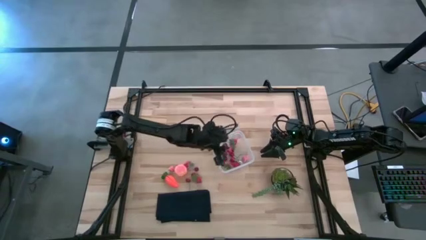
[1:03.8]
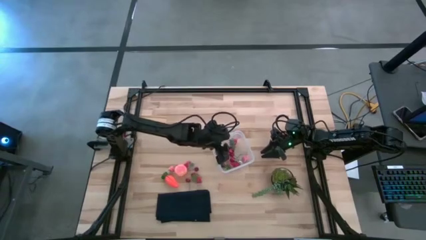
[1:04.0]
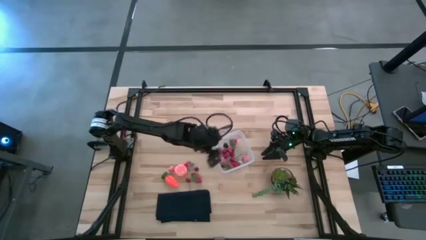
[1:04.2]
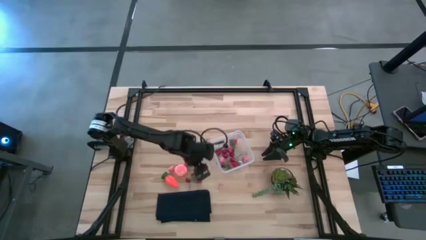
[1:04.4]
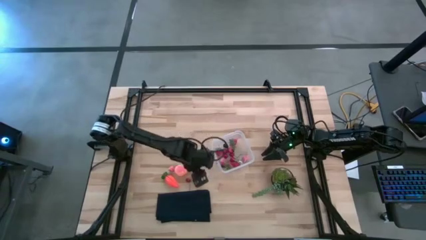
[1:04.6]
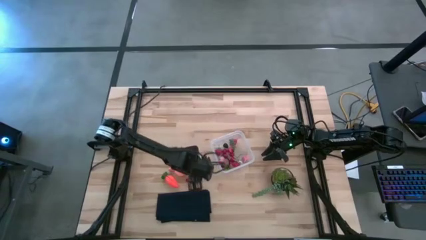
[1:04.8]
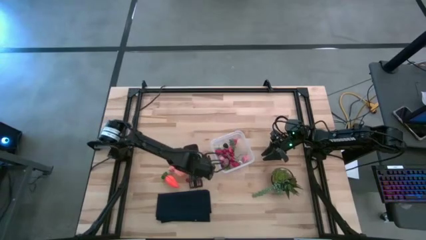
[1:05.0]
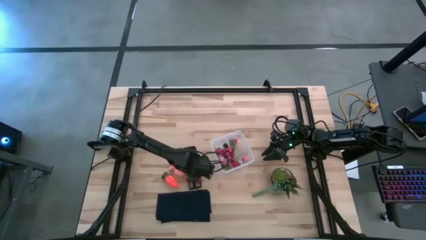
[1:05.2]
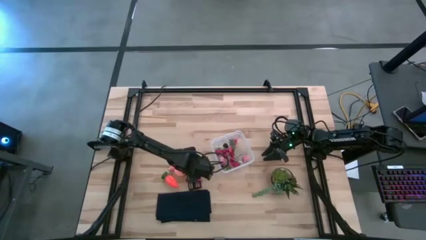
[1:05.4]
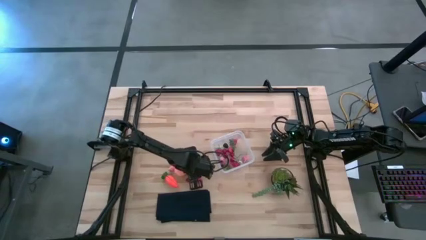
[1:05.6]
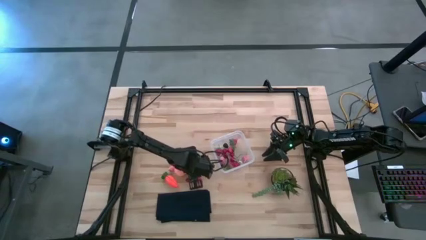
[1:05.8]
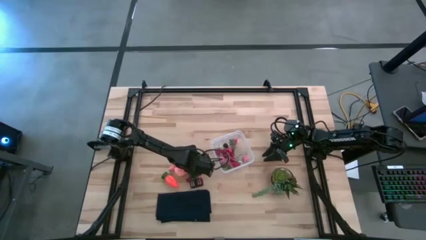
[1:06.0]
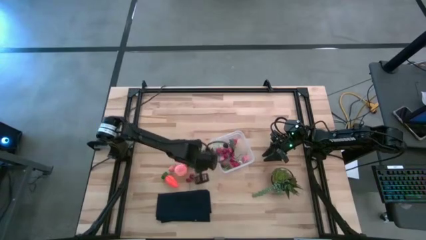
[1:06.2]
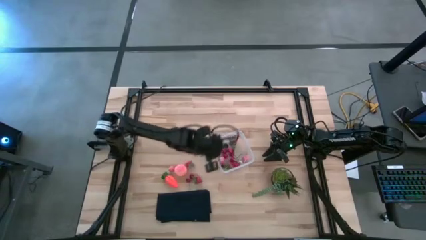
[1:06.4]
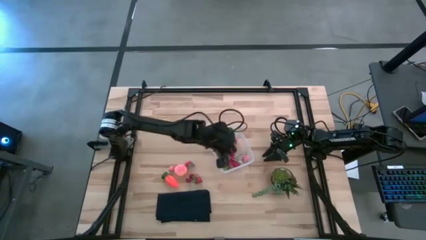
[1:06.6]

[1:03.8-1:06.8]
Task: Pick and placing Produce into tupperware
Put the red cherry into the container

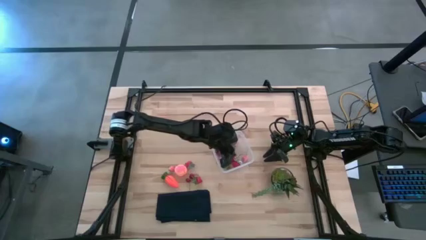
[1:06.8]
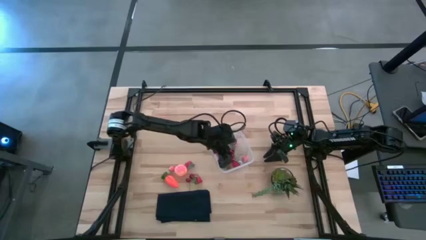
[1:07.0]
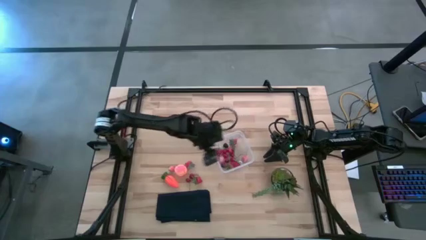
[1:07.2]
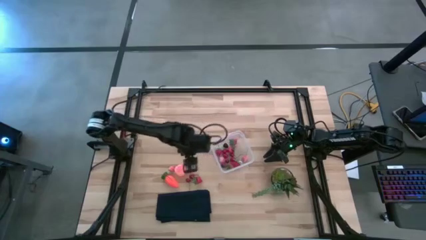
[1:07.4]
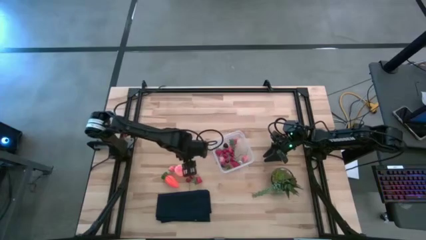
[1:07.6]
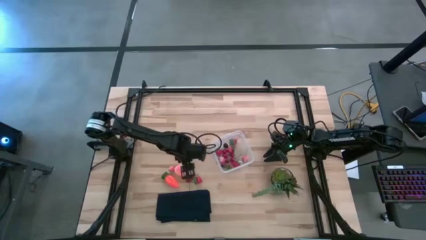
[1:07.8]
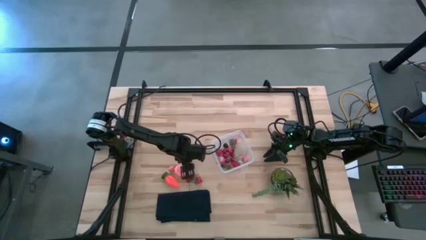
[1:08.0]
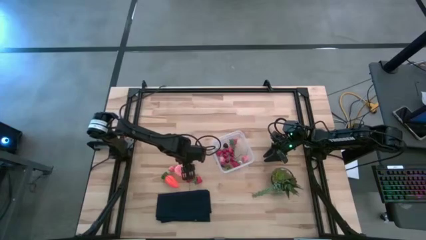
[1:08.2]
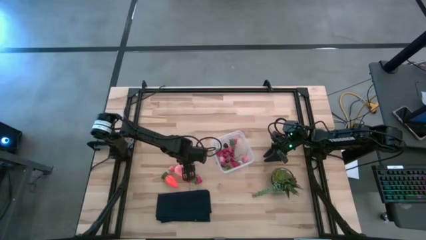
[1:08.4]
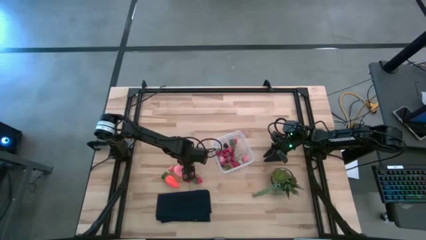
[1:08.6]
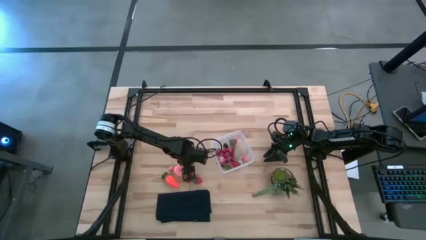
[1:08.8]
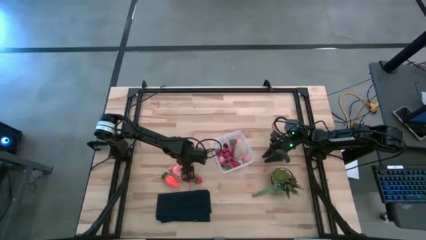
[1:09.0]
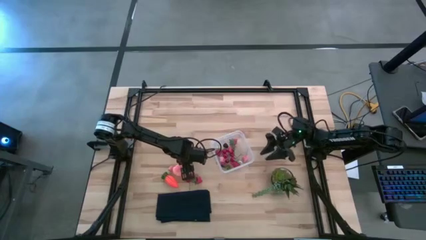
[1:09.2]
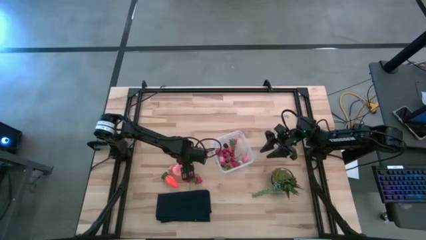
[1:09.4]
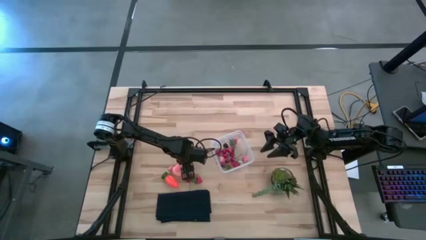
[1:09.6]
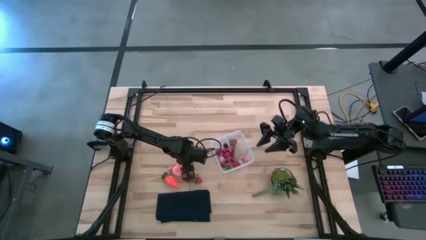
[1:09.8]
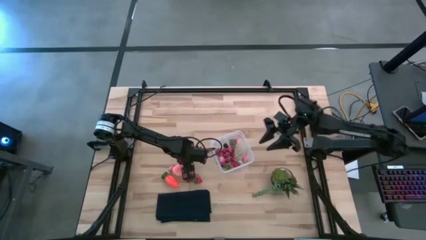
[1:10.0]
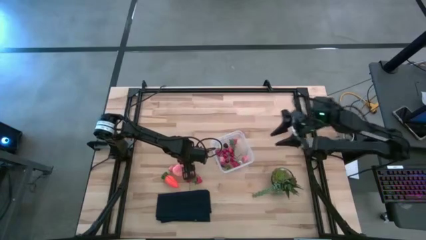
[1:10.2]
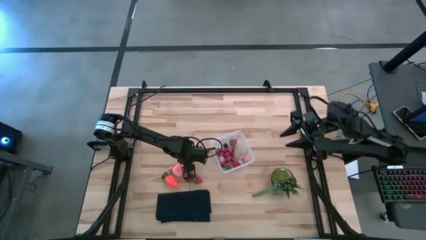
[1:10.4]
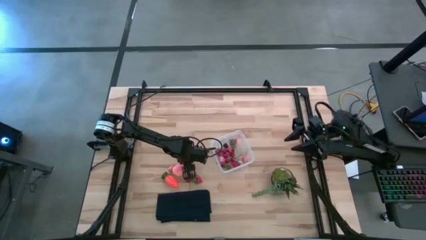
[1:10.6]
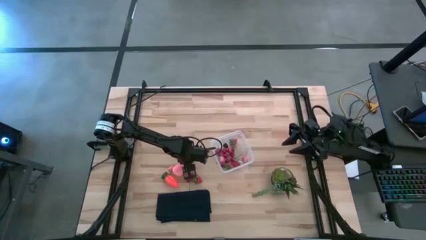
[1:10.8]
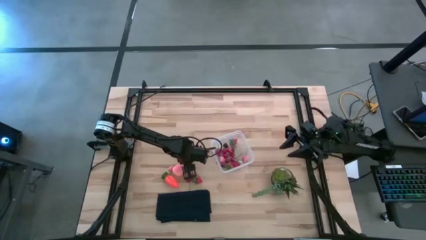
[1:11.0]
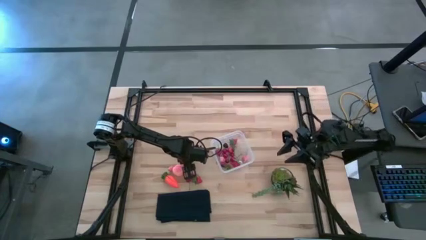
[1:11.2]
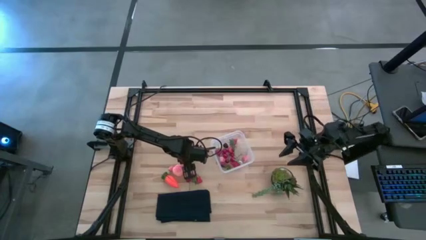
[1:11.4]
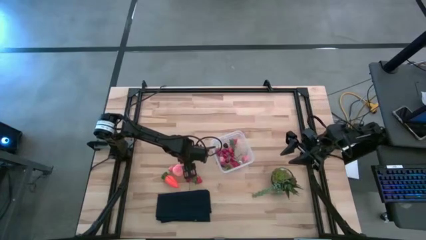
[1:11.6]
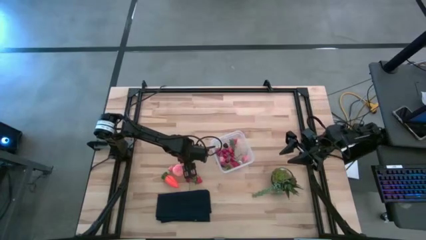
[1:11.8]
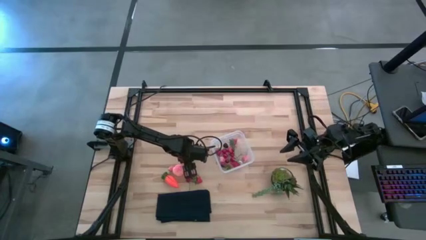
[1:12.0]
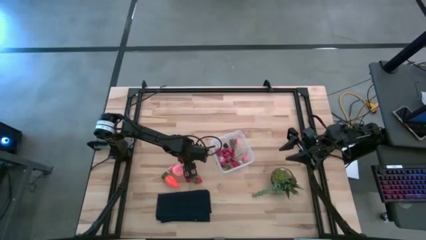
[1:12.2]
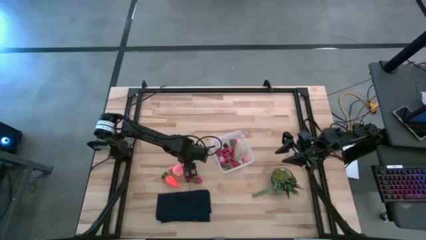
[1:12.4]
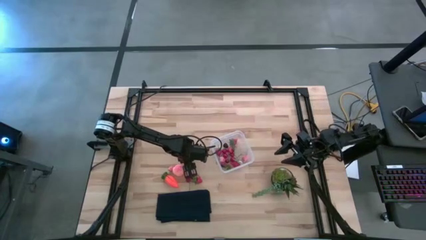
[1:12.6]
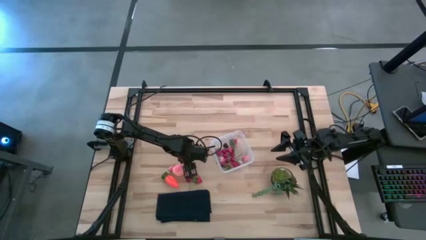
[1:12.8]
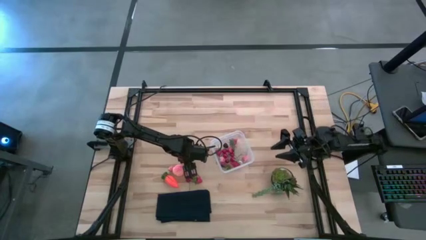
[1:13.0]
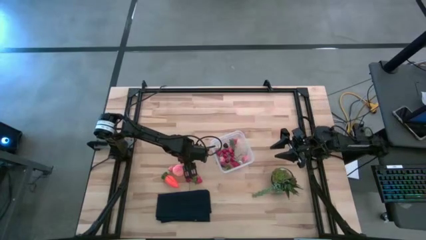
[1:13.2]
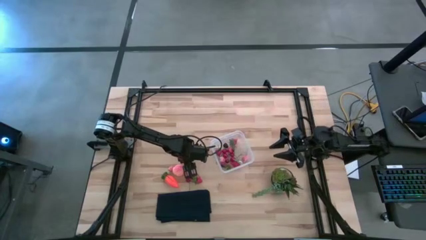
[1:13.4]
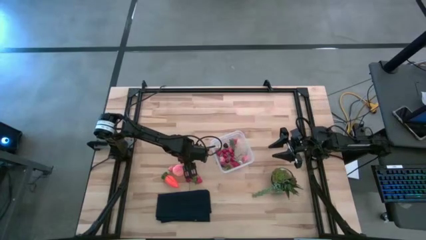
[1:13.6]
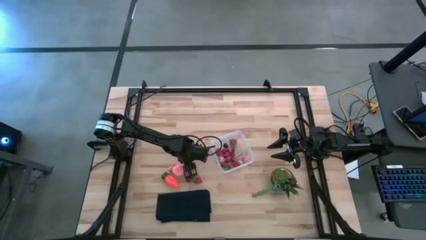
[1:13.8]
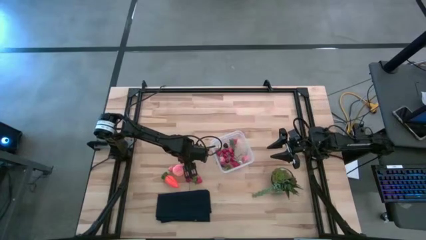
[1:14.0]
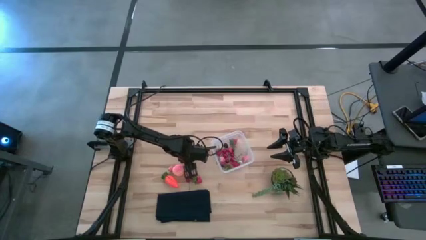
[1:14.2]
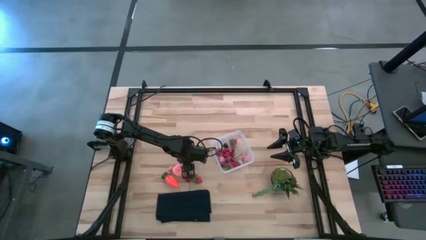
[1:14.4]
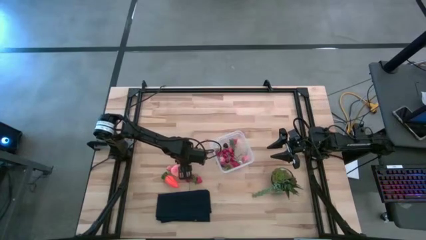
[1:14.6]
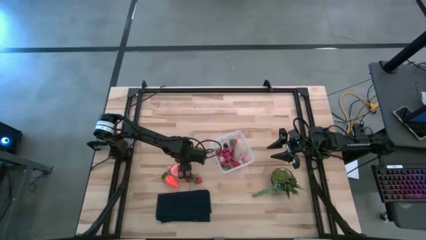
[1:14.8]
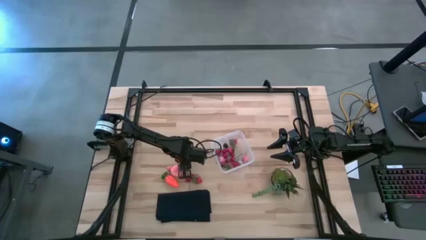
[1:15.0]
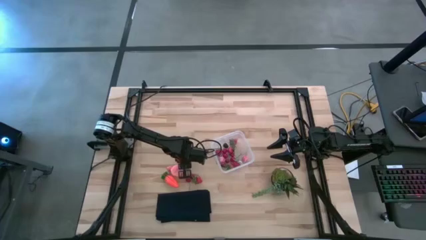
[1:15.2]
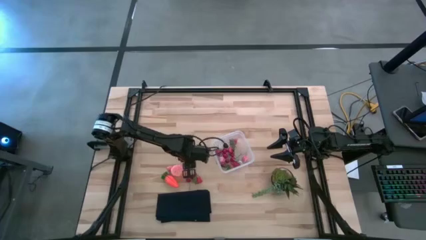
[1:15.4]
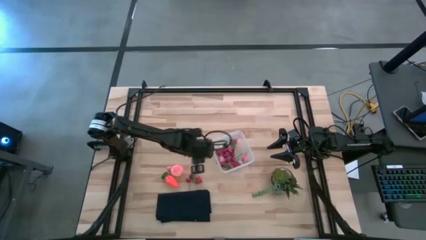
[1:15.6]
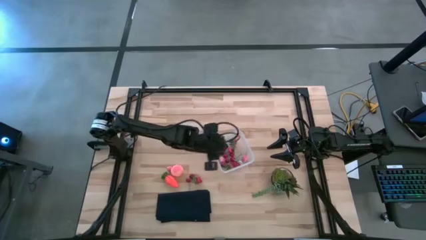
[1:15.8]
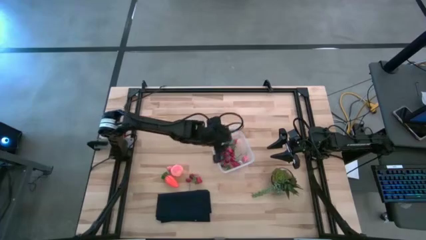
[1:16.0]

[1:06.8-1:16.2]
Put the red strawberry into the container

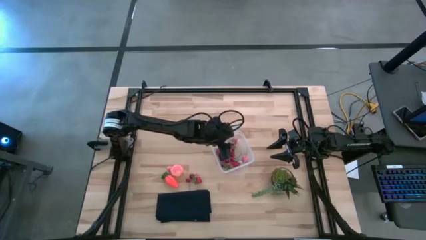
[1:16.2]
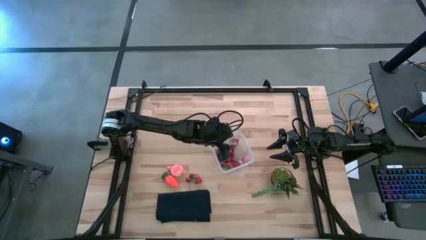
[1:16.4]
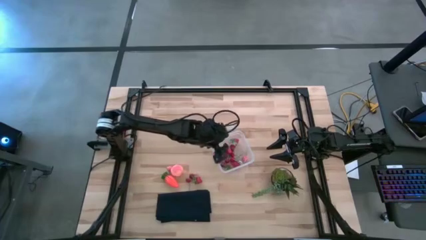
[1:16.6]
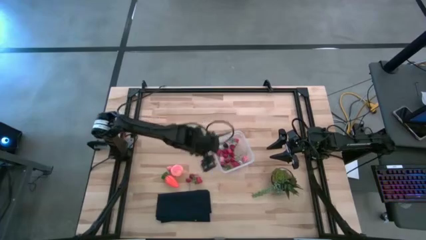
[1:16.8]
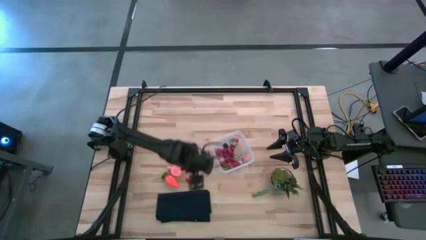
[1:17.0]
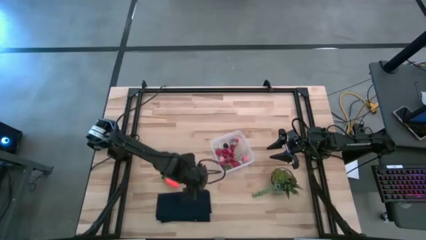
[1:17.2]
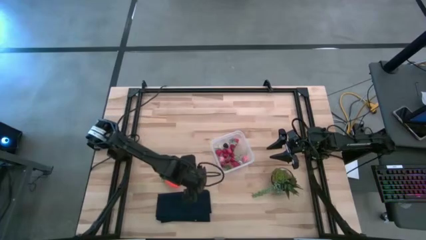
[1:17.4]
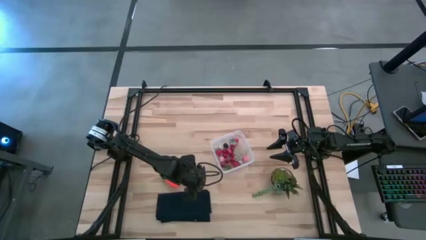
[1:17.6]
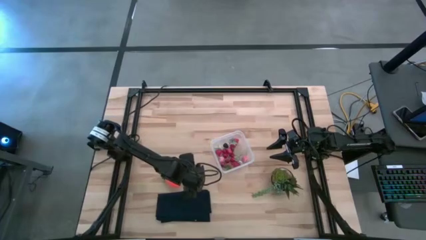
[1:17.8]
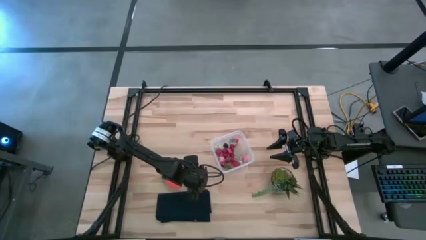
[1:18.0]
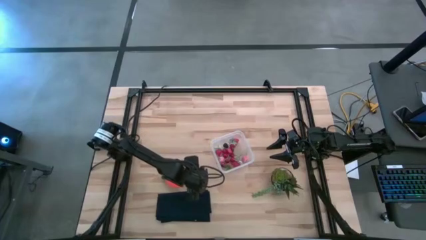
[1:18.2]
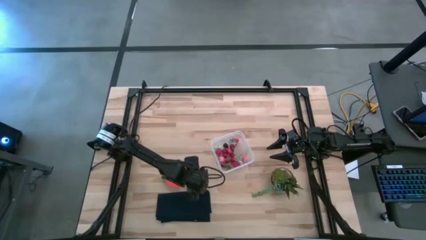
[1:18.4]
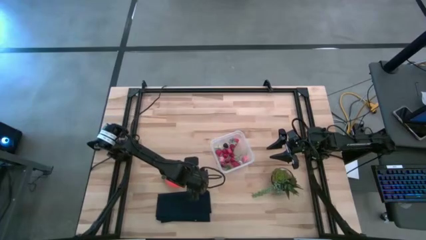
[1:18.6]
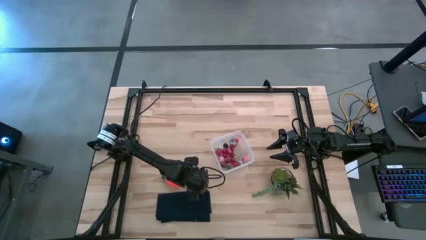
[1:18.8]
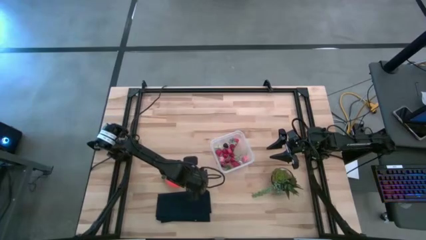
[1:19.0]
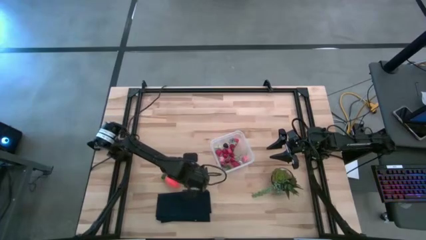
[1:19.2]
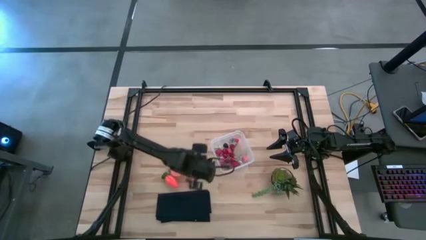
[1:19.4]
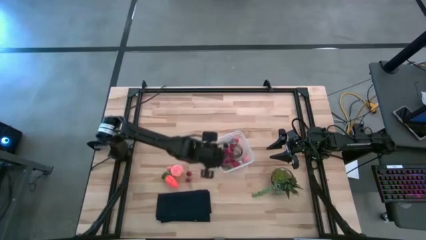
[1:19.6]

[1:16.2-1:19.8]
Put the red strawberry into the container

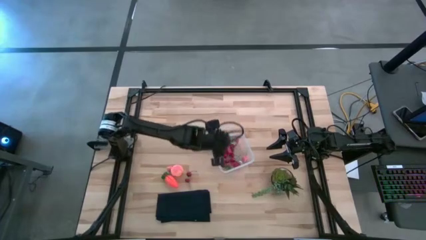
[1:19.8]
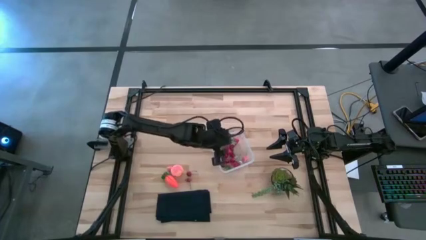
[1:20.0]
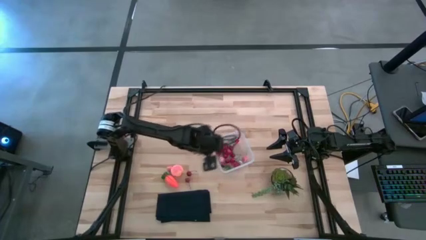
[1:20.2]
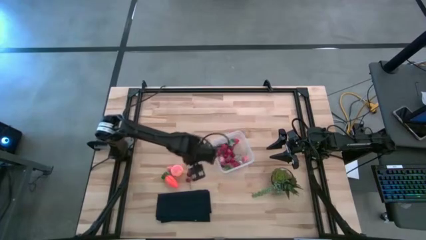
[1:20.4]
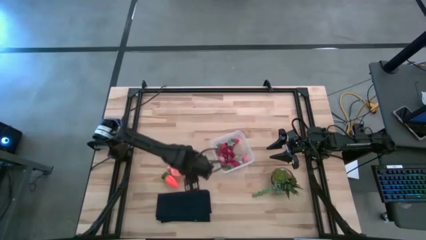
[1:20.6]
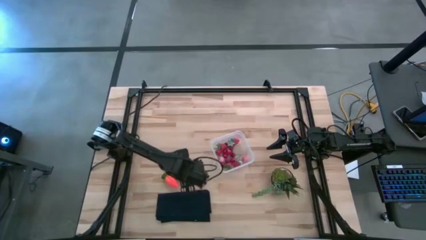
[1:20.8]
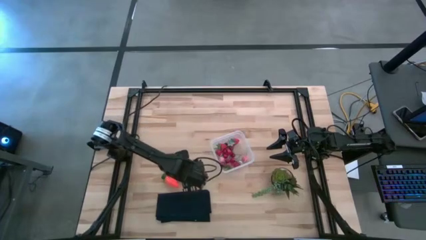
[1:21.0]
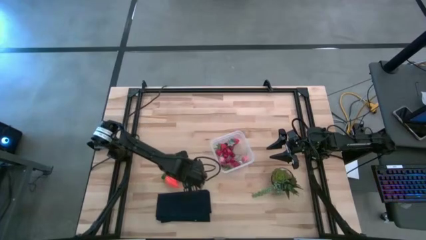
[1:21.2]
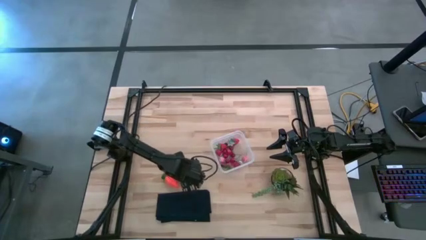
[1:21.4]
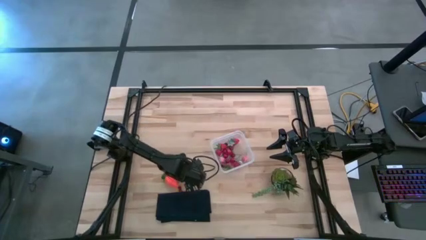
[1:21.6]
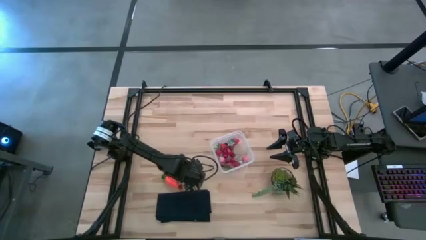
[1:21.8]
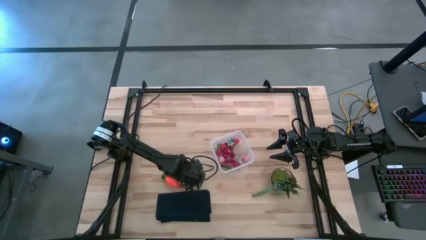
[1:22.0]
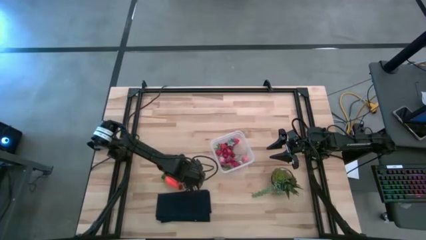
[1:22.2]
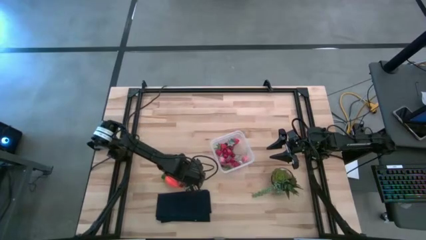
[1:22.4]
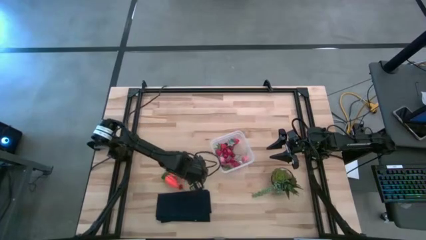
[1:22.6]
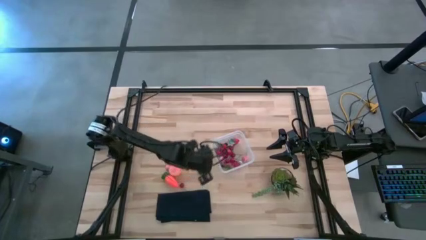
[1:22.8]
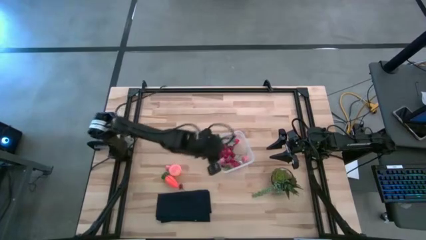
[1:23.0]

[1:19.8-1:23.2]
Put the red cherry into the container
